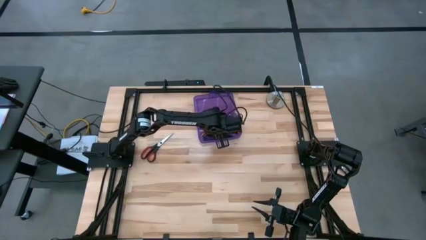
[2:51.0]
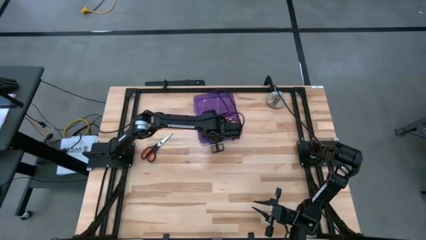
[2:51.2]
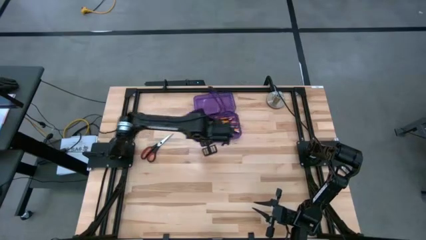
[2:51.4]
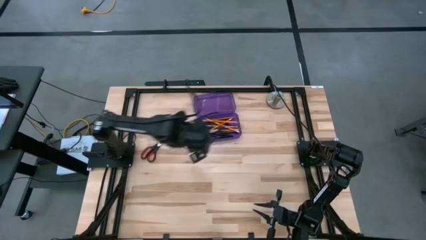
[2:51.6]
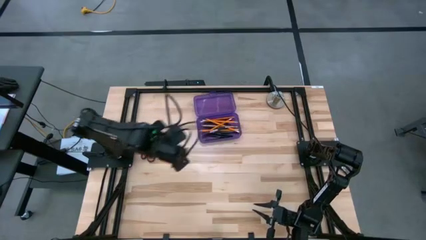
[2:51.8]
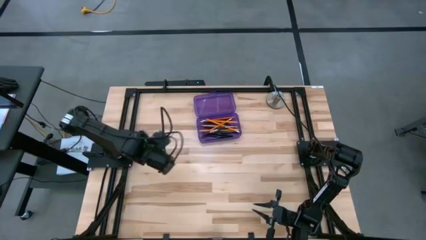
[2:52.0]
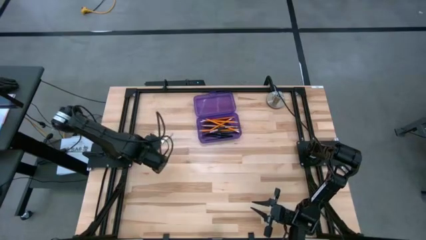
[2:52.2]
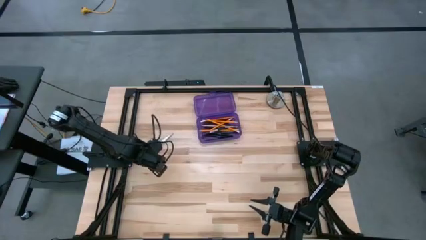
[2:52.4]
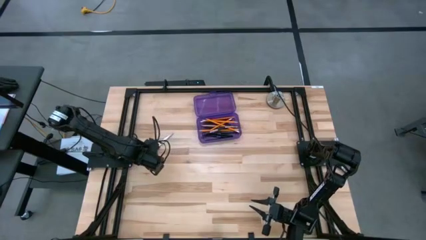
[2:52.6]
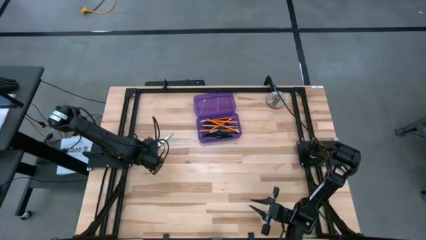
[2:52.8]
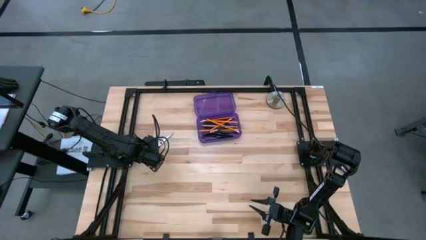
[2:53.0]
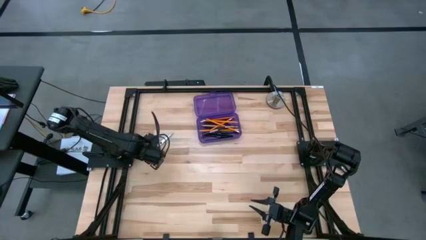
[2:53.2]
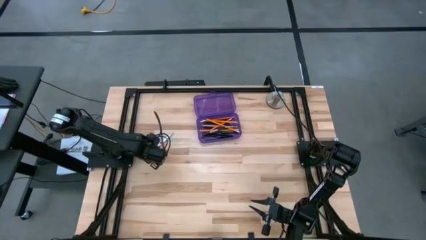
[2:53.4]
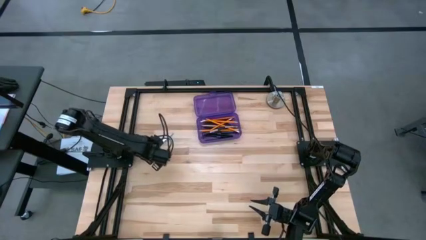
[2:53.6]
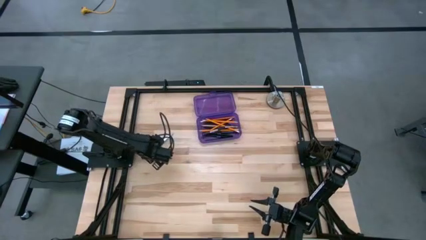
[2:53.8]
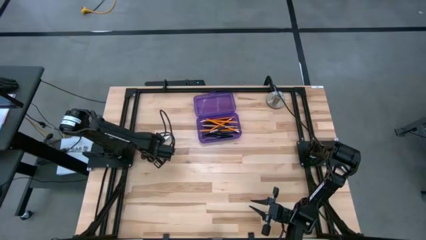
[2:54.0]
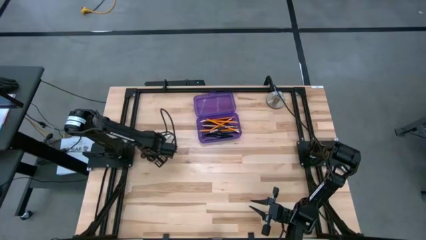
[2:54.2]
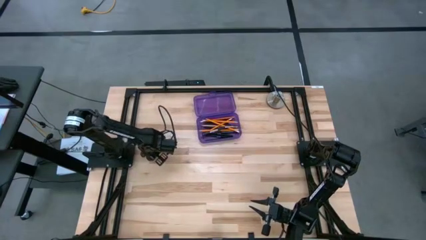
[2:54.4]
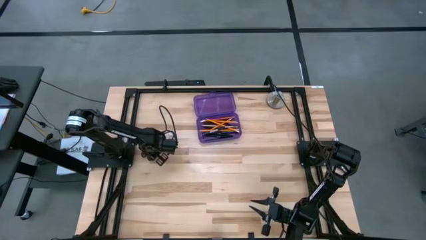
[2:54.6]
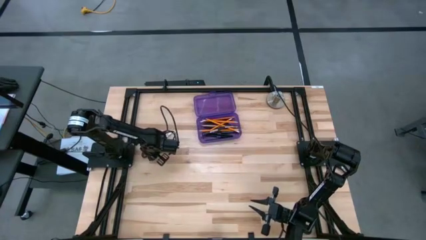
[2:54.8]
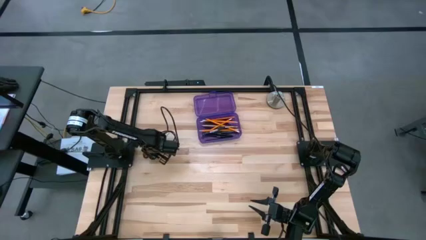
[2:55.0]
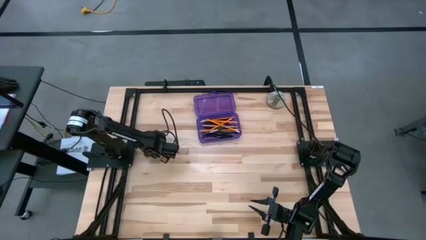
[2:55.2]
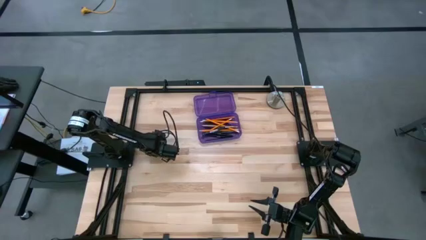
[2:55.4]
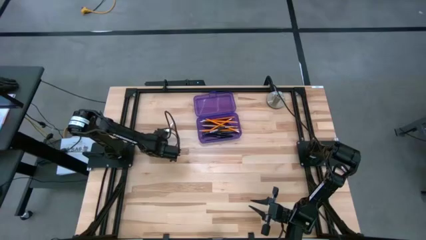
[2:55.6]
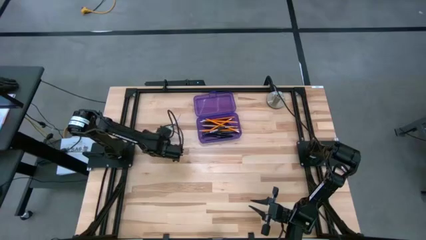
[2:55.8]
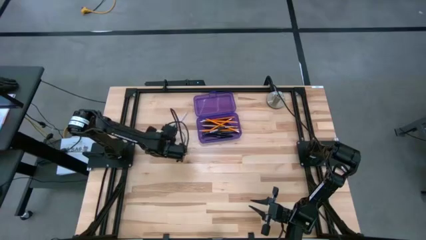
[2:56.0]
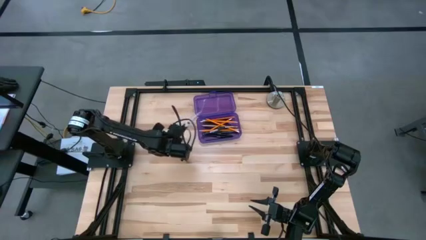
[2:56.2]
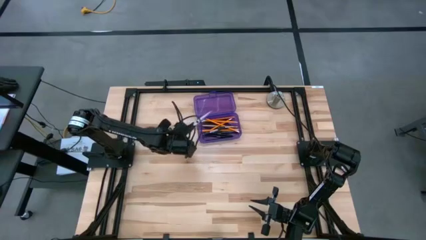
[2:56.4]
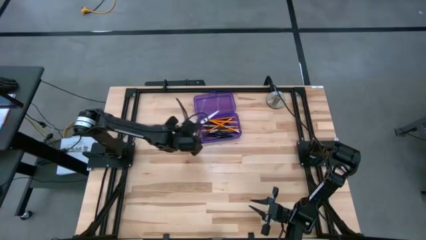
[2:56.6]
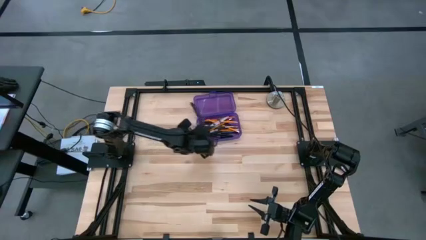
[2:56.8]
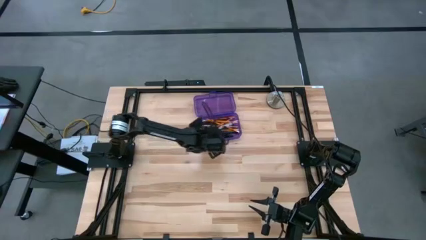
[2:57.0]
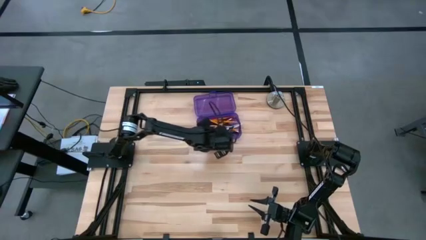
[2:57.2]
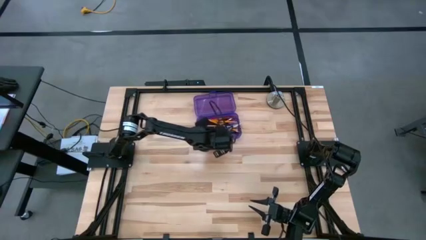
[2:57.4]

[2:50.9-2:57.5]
Task: Pick & place school supplies into a supply box
Put the black scissor into the the purple supply box

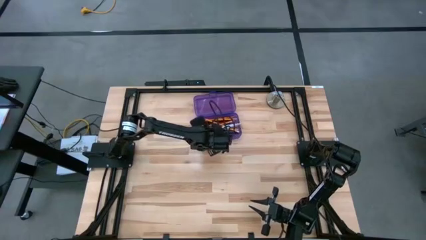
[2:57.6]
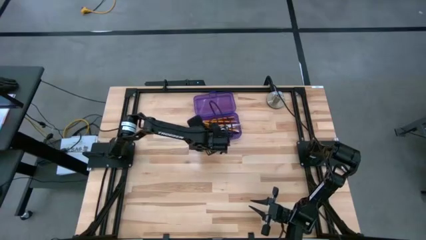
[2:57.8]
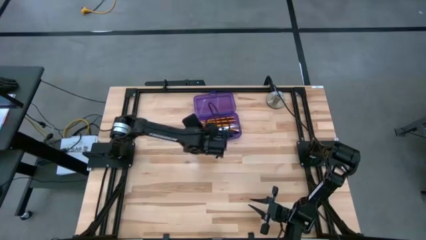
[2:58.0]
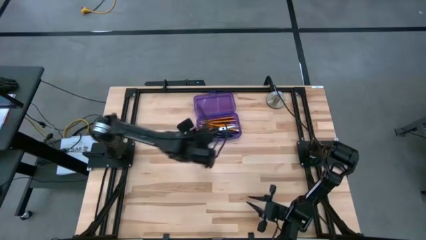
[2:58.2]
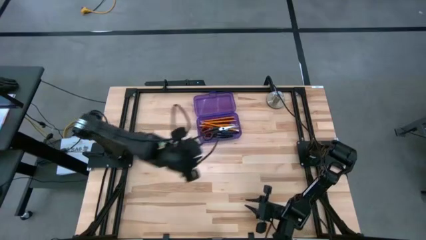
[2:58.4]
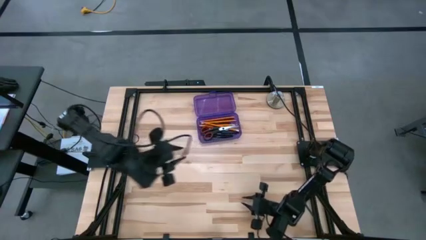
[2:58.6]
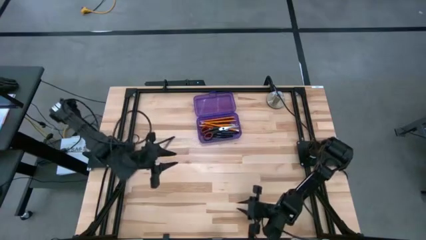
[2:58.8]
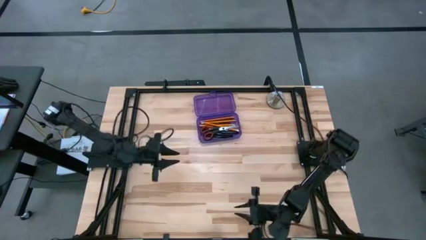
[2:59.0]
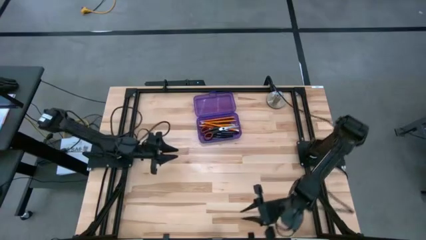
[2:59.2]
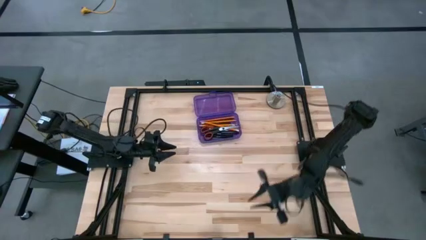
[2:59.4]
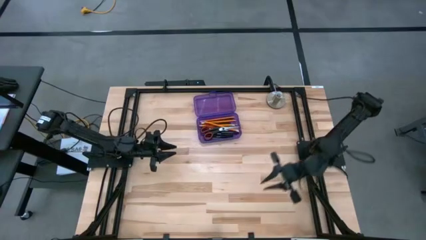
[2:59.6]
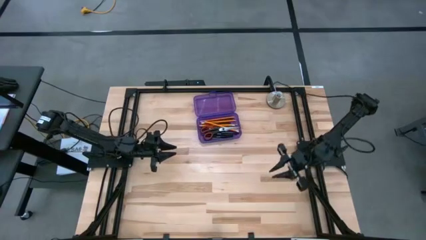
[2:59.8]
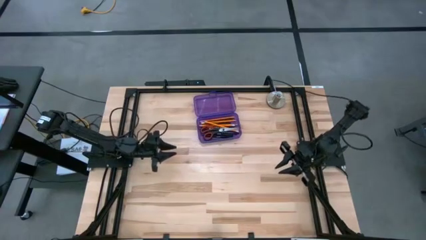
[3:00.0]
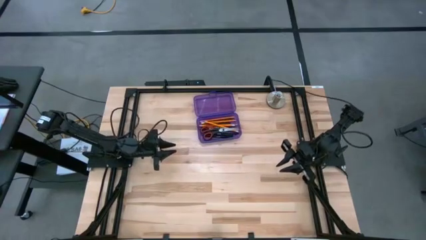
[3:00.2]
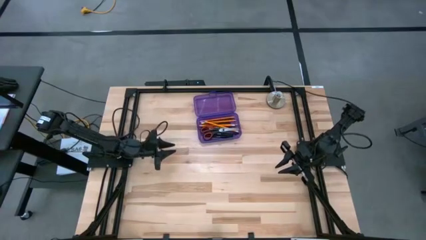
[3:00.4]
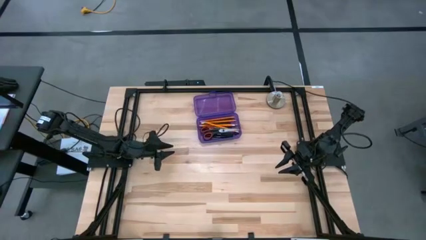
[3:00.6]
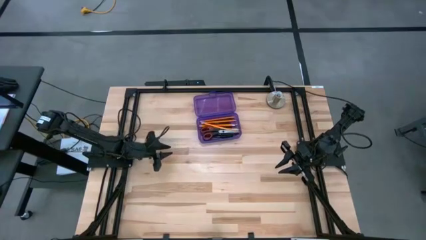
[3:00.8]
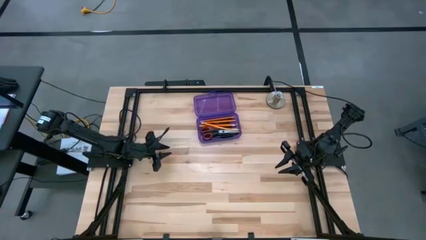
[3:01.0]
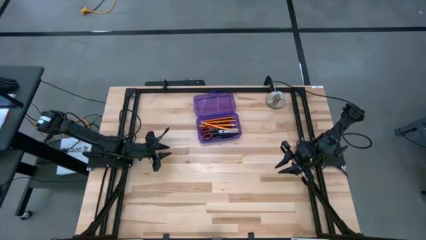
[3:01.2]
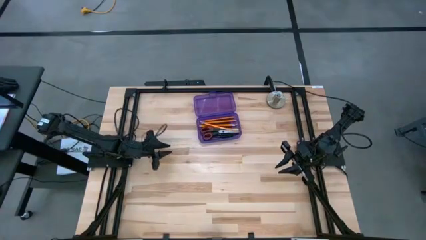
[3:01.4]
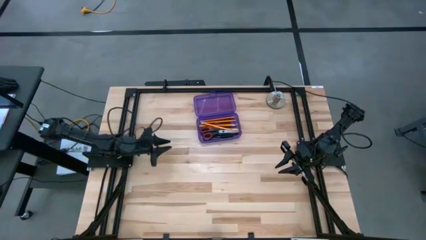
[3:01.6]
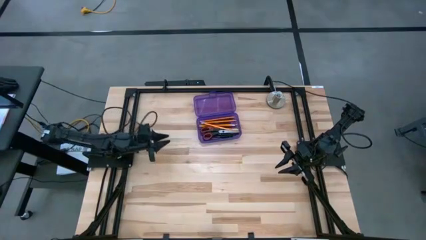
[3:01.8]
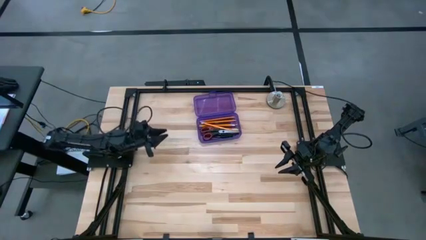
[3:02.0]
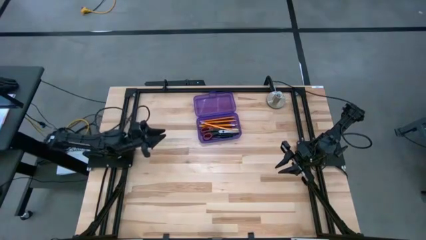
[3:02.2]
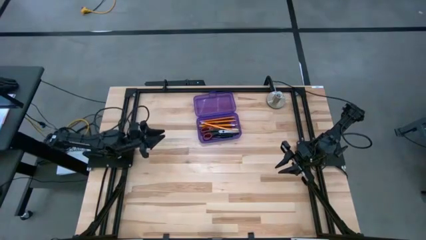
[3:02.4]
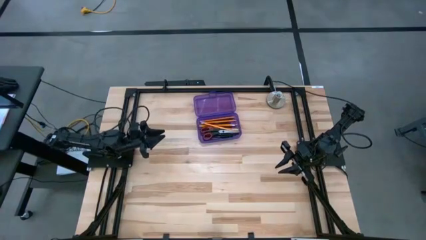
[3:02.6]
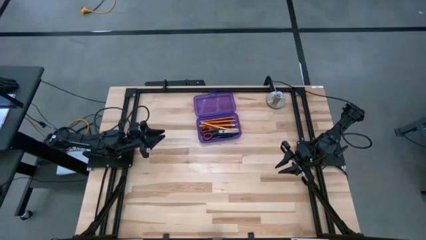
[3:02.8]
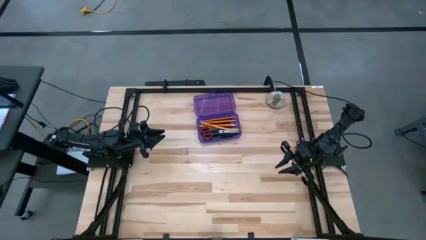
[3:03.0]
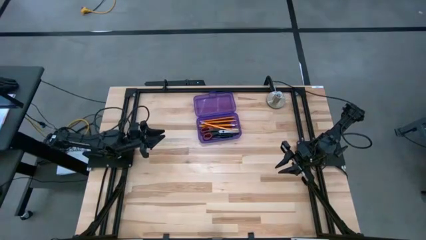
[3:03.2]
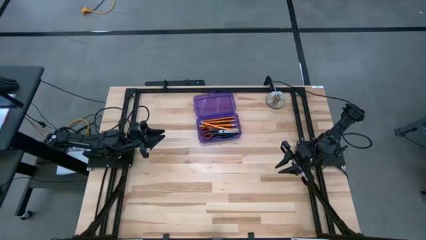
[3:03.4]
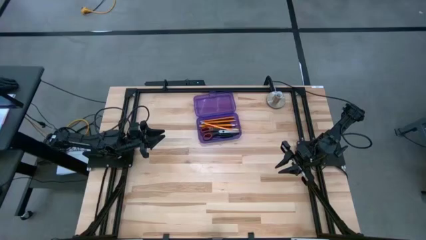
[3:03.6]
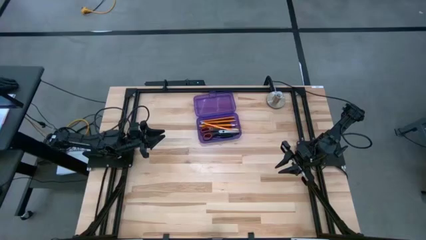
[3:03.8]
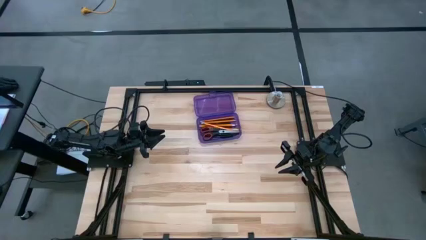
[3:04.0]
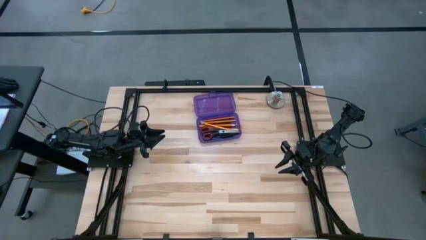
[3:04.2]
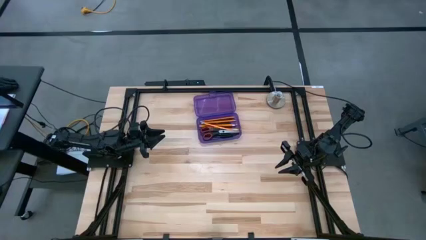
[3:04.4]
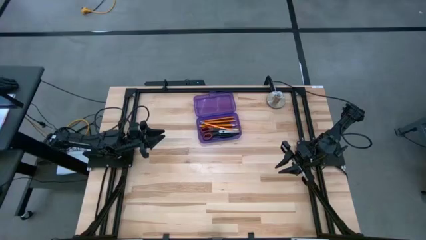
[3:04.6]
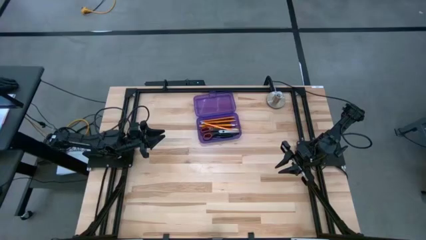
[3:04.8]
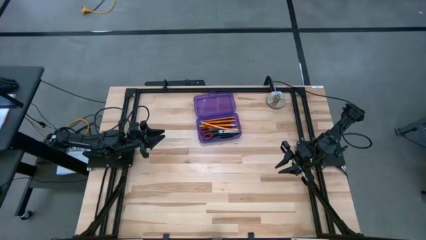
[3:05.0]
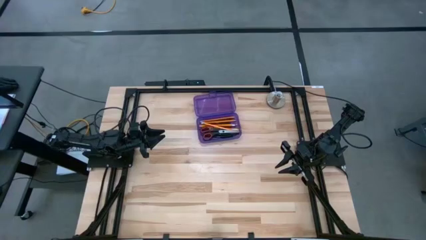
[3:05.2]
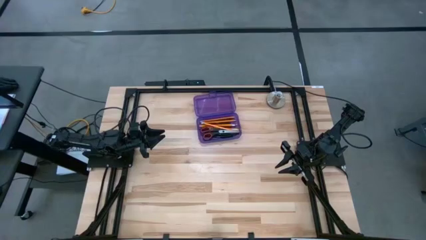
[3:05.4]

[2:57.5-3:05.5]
Return to Home Position
